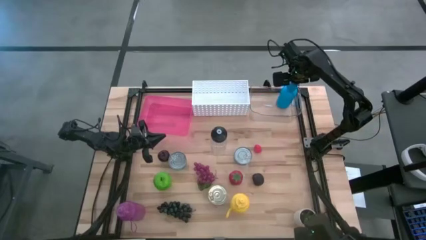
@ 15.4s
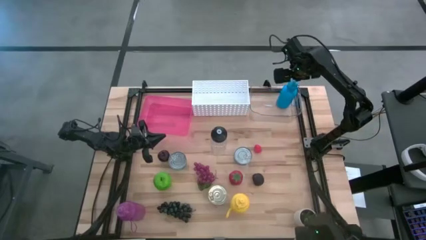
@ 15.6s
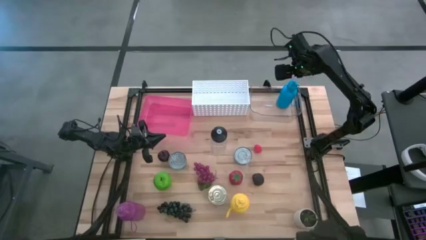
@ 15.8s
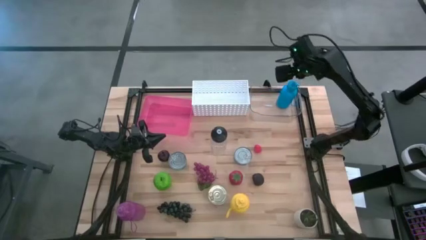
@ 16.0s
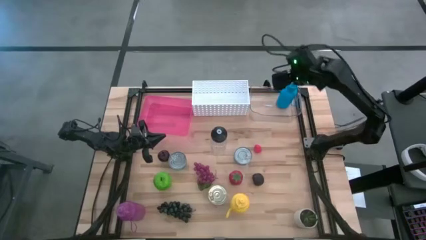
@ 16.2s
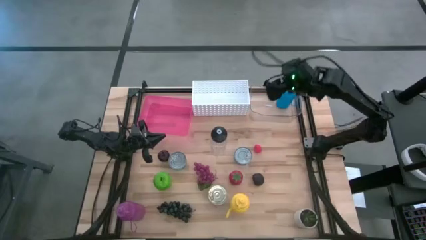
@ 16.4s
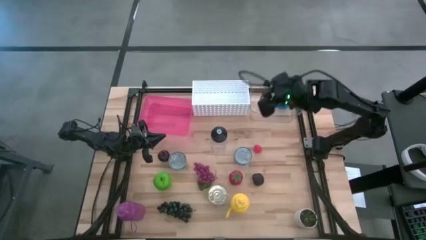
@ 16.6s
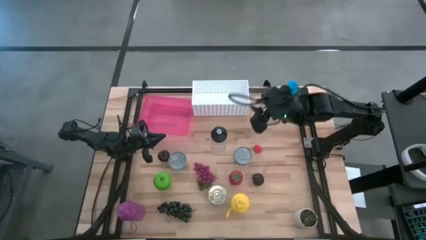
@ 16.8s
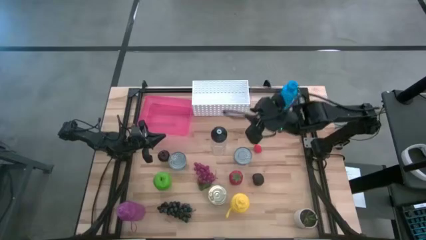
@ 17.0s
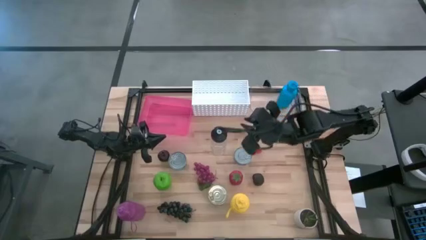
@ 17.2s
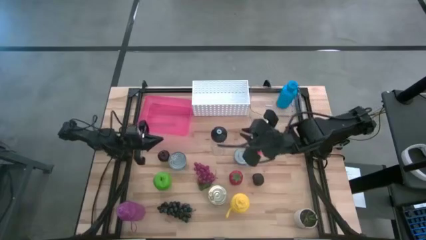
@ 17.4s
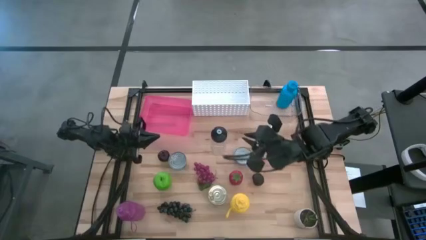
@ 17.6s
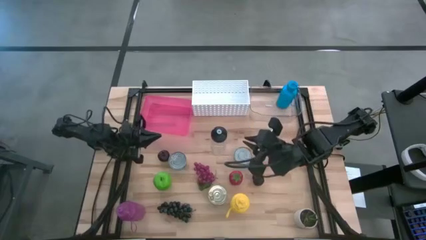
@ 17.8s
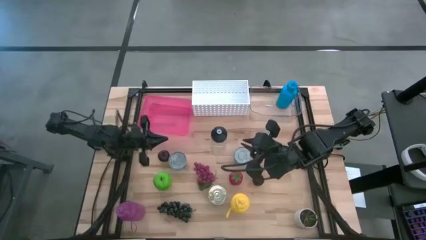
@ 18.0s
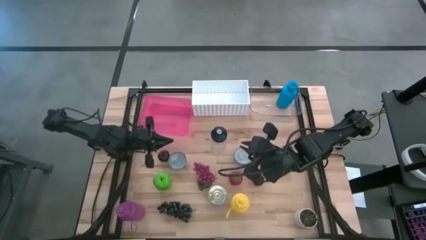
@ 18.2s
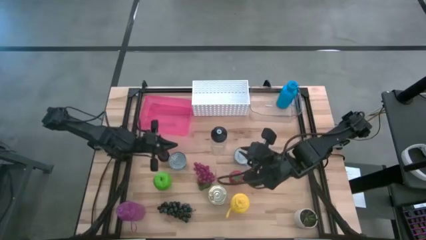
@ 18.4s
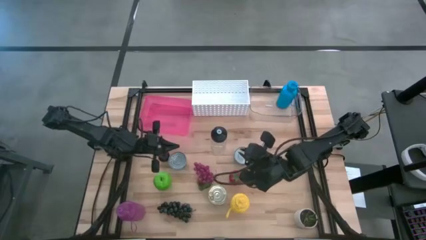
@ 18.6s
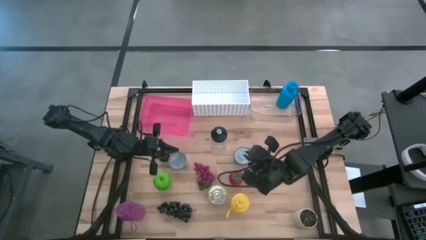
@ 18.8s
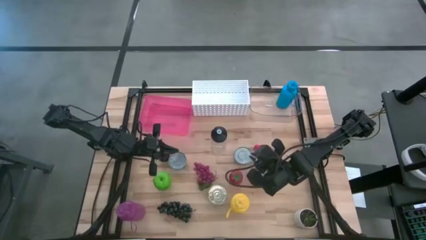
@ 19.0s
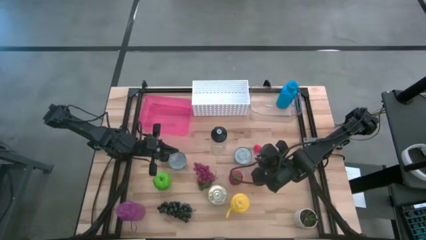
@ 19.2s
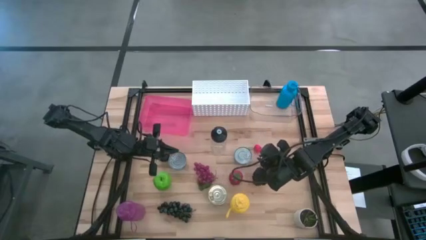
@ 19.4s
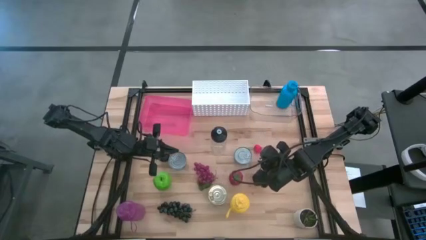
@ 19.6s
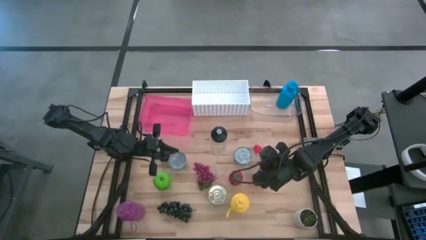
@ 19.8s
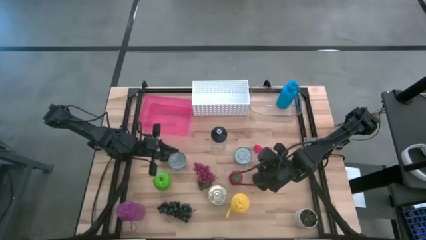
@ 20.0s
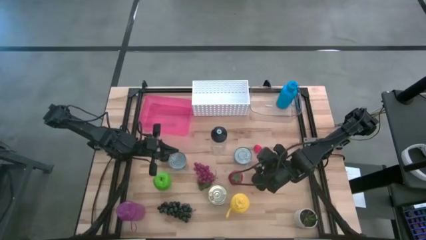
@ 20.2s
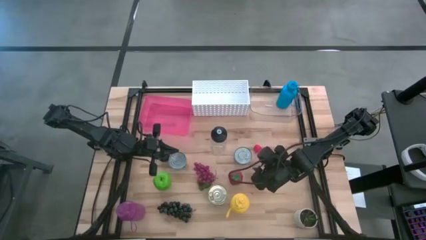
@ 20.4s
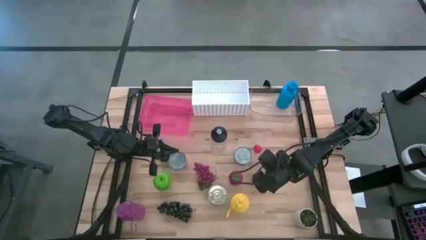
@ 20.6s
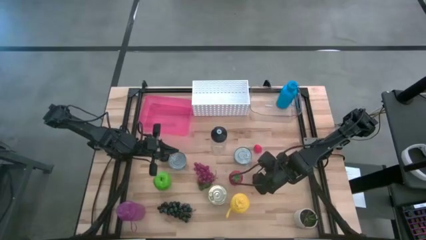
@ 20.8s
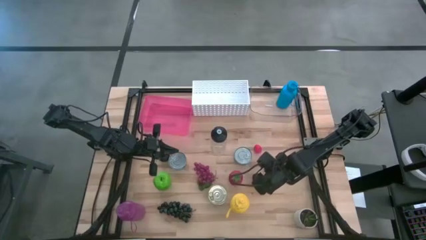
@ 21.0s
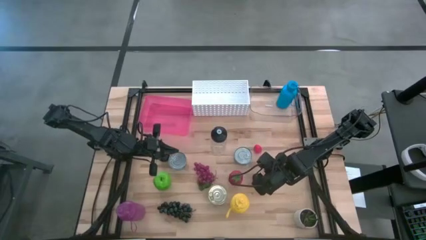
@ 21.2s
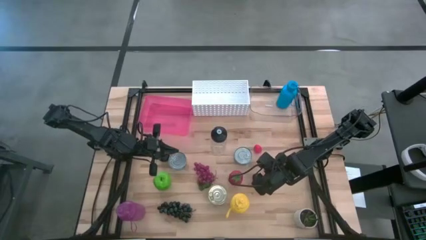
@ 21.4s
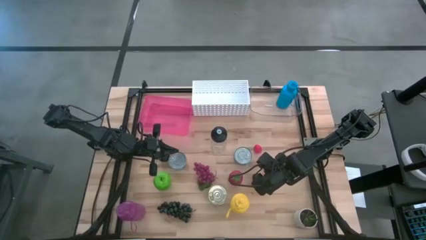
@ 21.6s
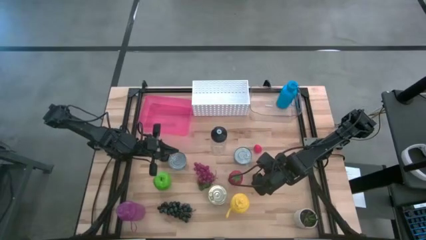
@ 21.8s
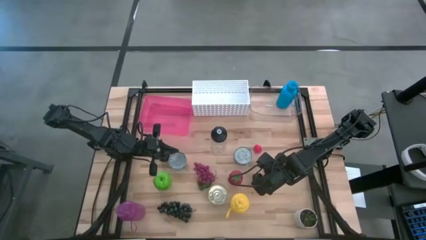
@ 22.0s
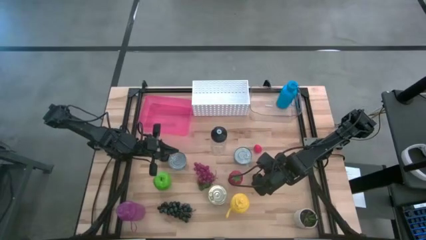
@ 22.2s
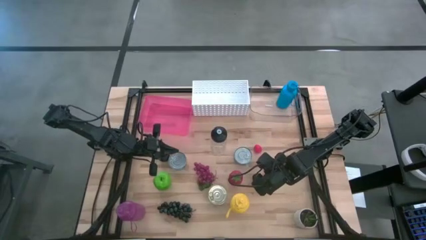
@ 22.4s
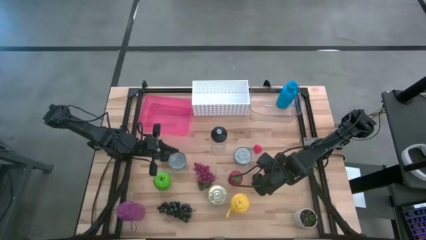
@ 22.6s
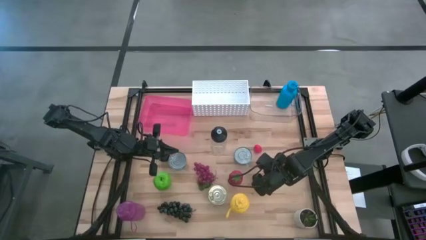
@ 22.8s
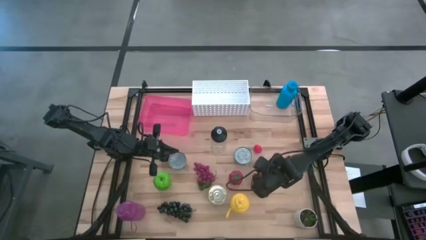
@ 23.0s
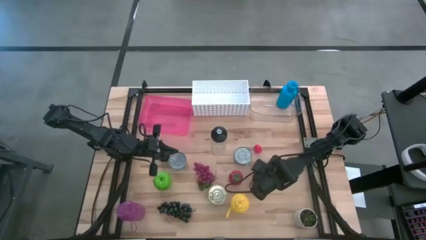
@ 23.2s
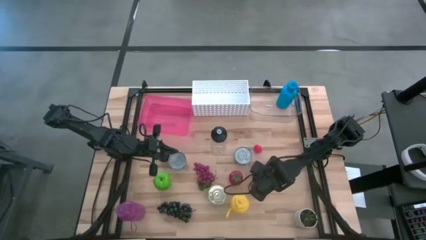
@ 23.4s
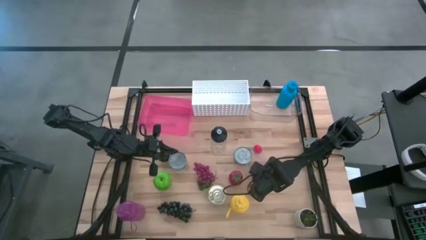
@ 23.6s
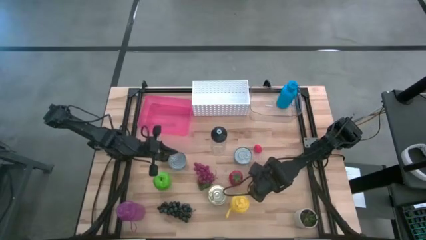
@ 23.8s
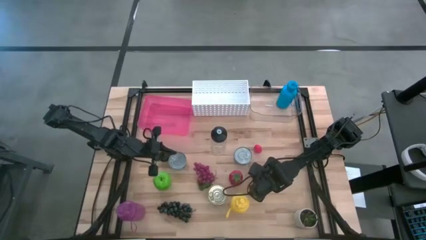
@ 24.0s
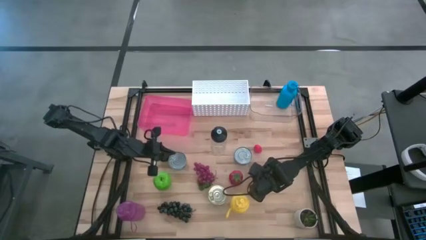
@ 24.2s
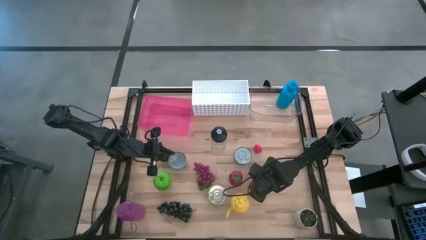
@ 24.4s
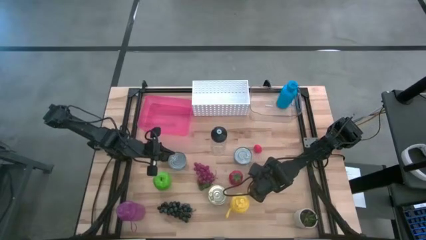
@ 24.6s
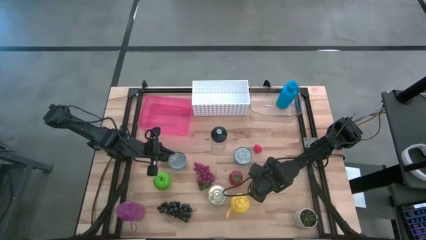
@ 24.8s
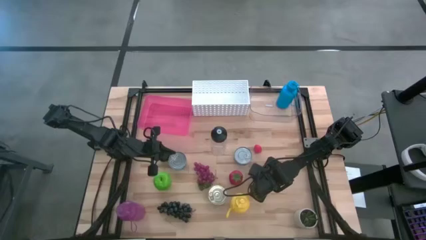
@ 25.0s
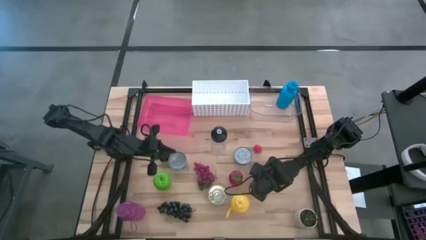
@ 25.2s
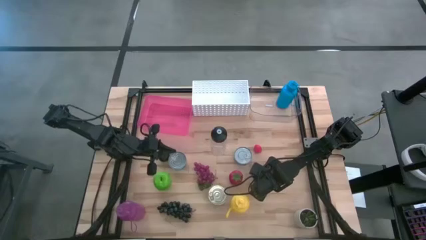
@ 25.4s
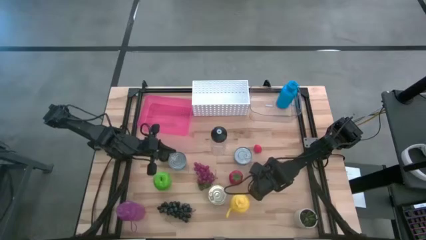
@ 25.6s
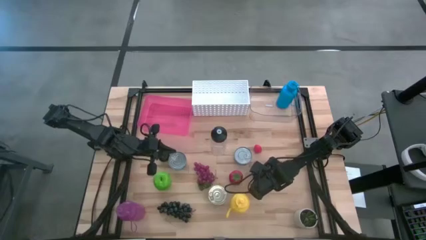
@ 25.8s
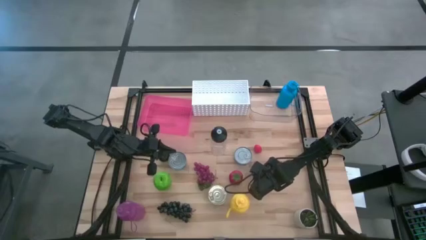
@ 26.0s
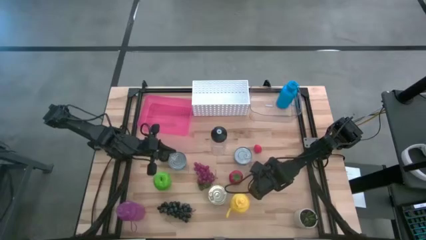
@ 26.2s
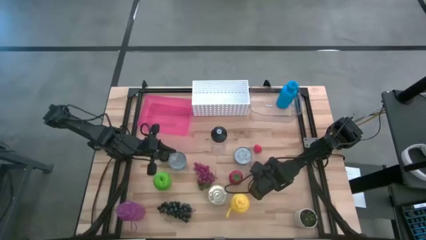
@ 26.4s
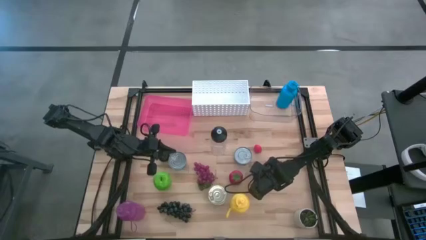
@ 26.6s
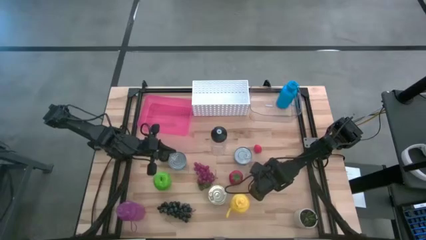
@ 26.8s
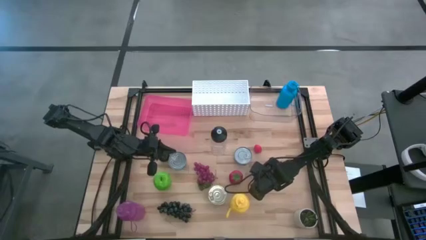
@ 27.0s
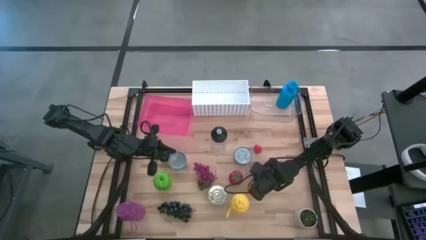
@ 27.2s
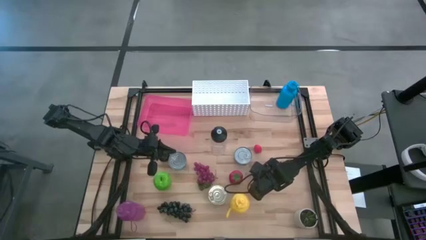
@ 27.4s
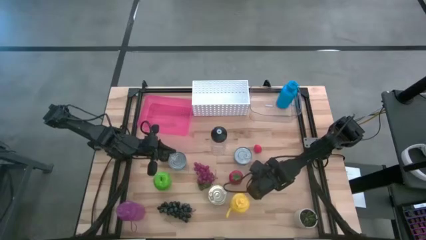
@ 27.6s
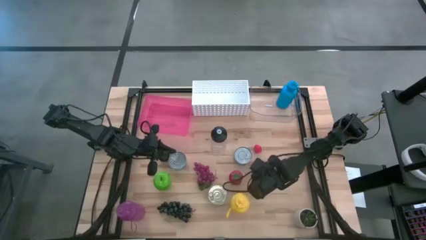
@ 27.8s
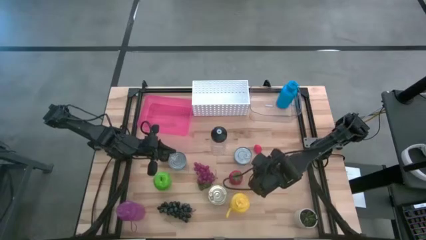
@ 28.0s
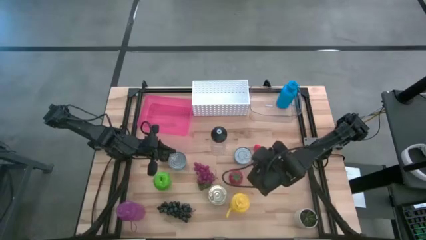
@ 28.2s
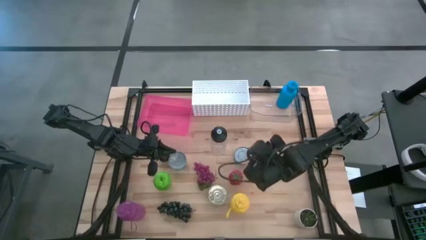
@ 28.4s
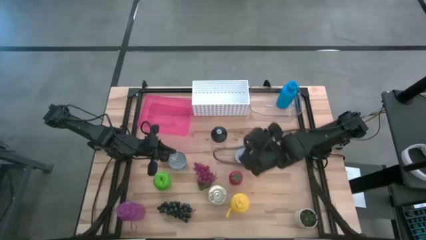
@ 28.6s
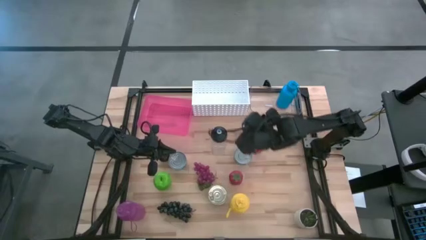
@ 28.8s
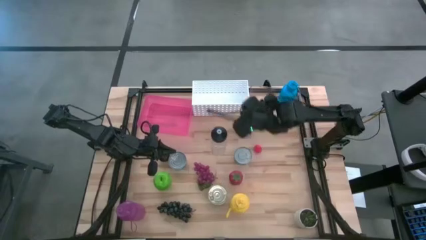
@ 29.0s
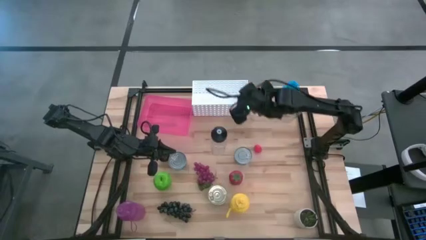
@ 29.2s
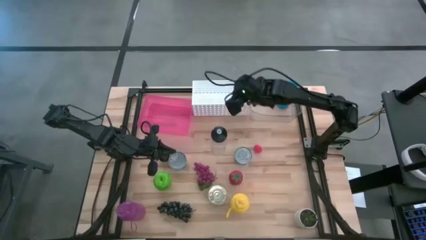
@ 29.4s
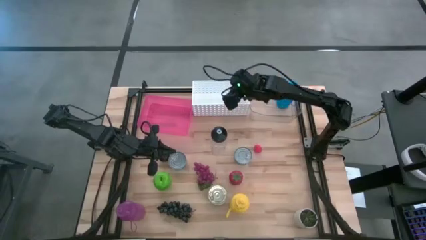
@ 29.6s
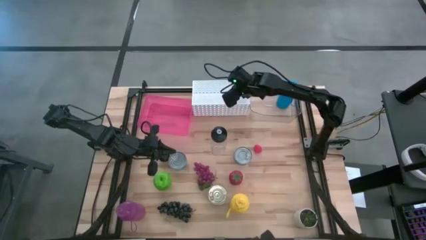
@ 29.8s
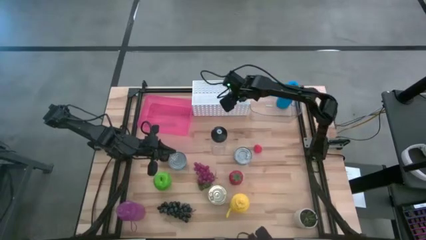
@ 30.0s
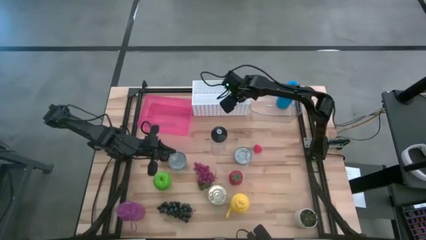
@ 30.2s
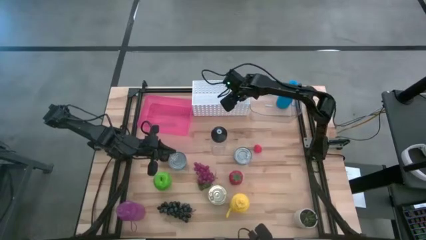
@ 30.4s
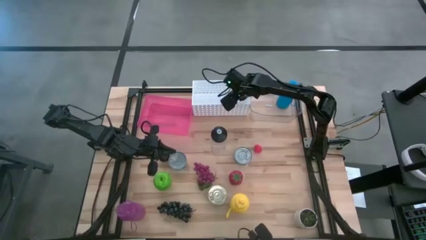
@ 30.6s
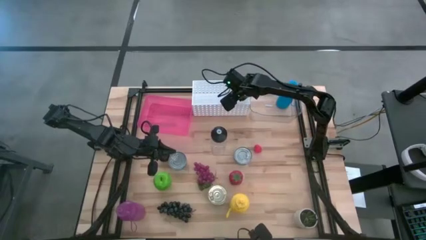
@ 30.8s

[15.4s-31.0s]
Task: Pick & Place Food Item
Put the purple mangosteen into the white bin
